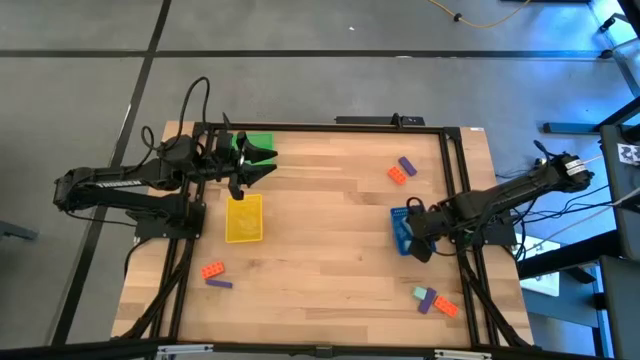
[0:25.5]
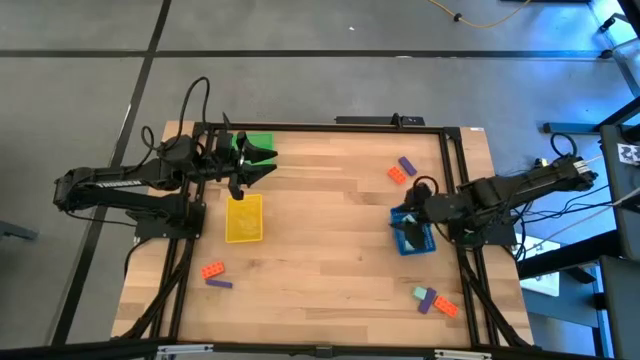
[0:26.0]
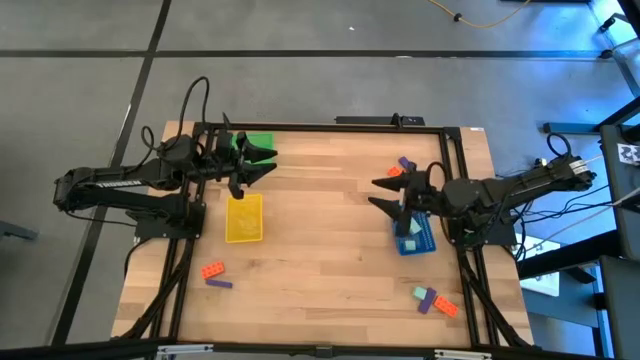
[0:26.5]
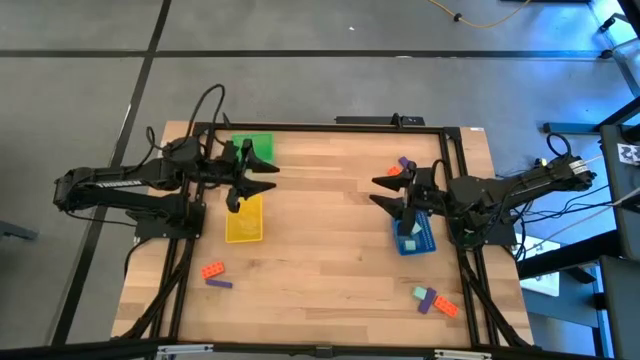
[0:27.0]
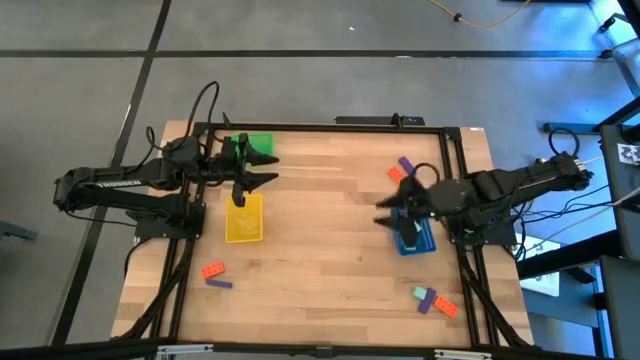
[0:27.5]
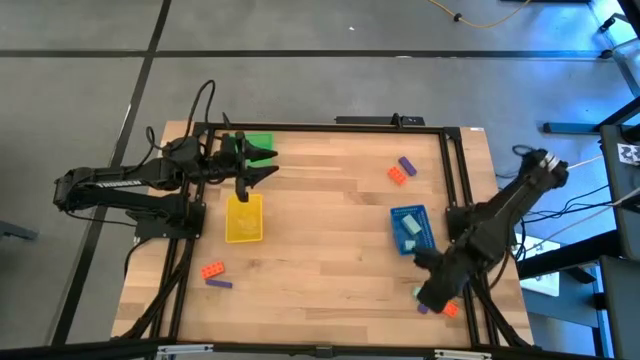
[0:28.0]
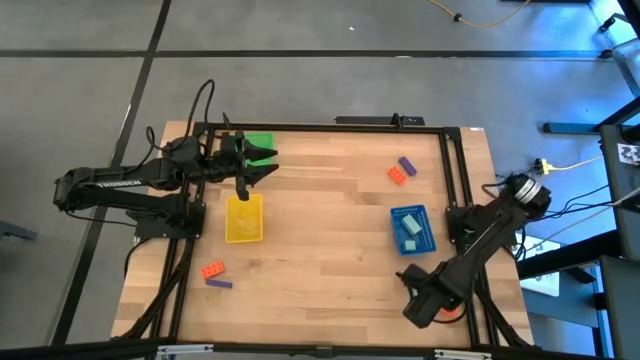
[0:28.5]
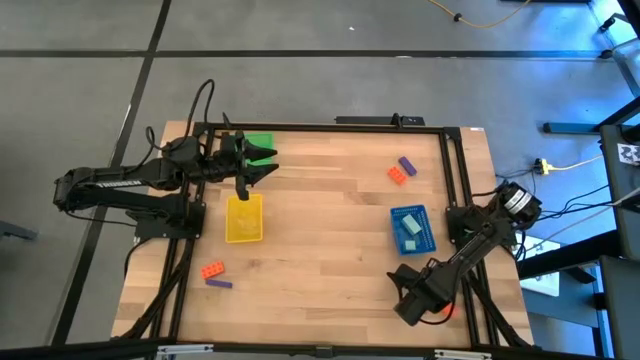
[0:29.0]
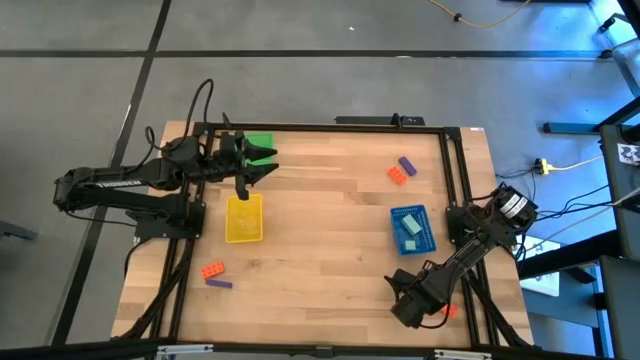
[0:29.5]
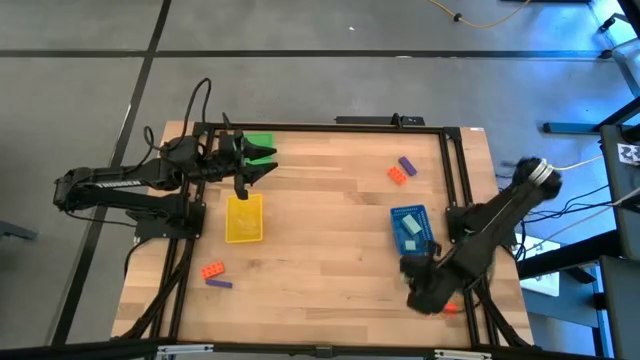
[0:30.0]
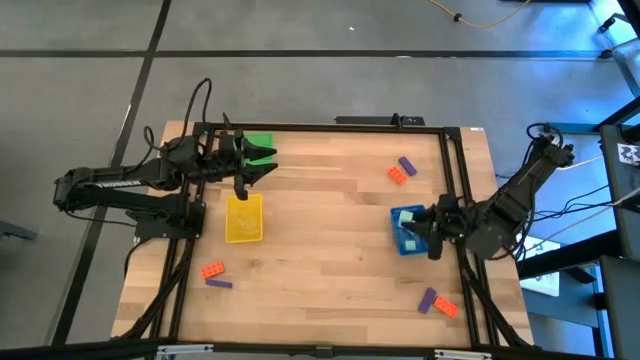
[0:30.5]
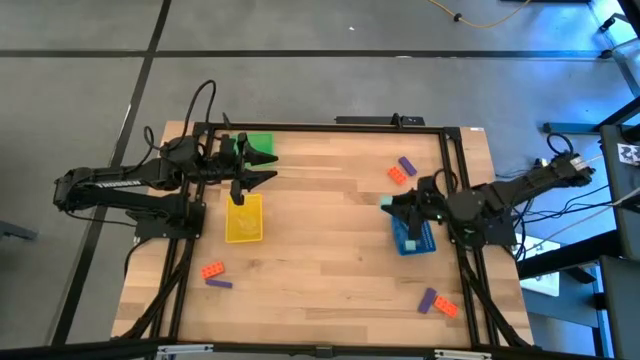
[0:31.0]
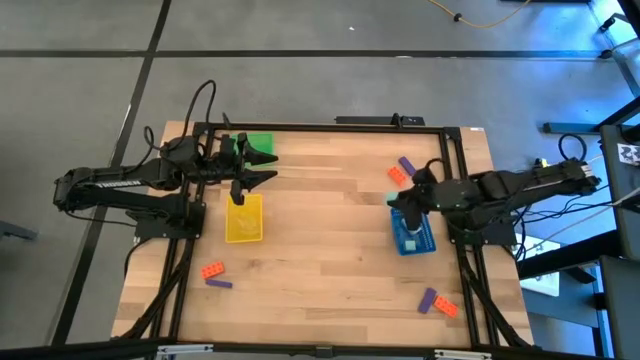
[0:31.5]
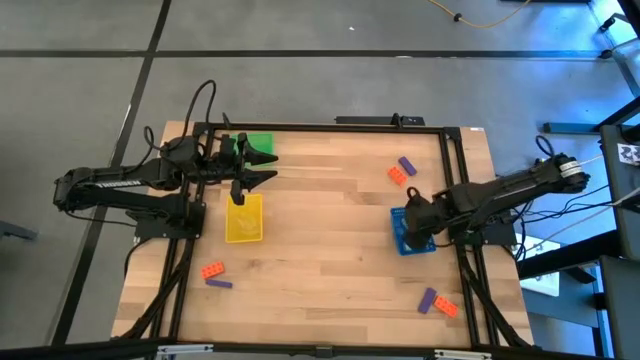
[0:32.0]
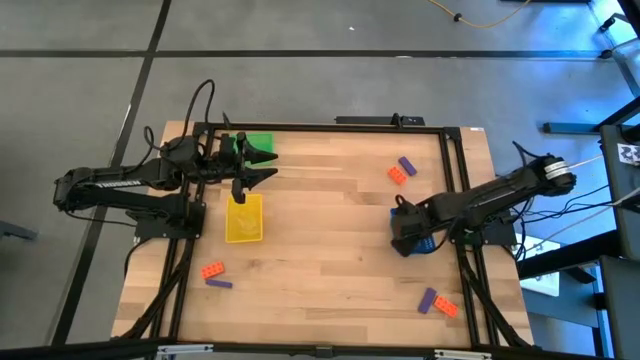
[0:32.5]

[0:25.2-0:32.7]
Task: Sort & place blocks by color
Put the blue block into the blue bin

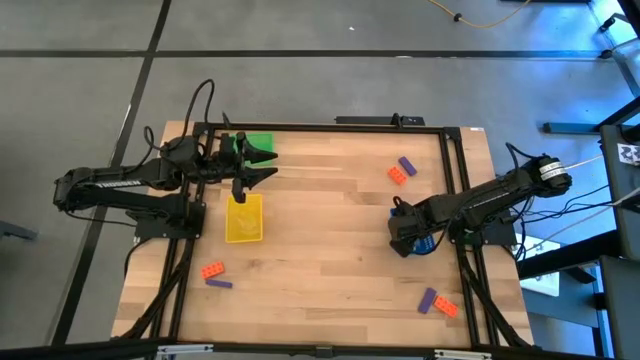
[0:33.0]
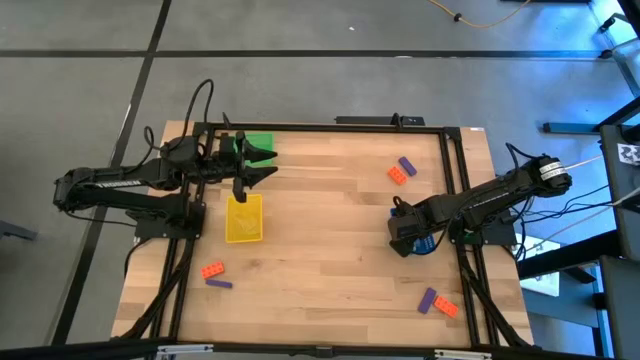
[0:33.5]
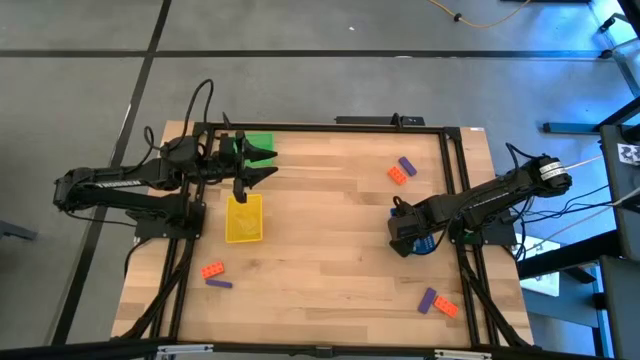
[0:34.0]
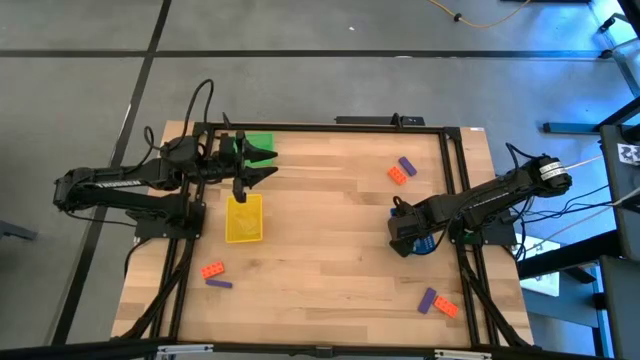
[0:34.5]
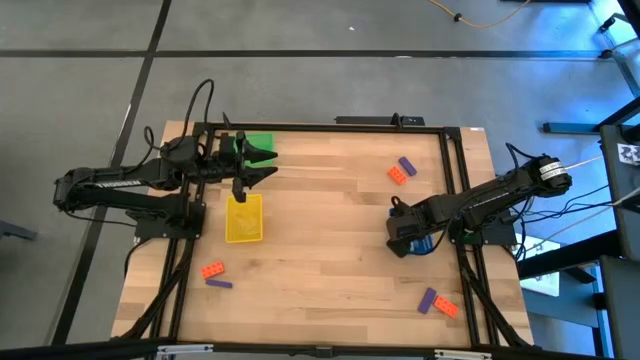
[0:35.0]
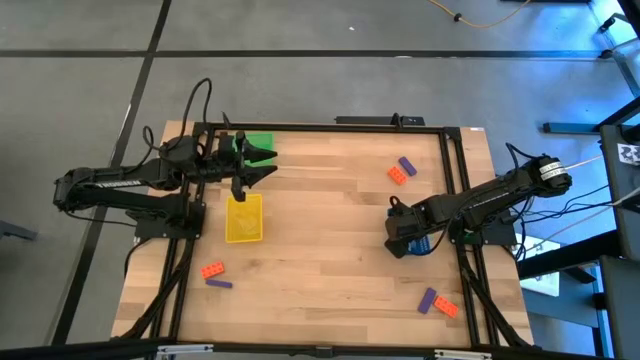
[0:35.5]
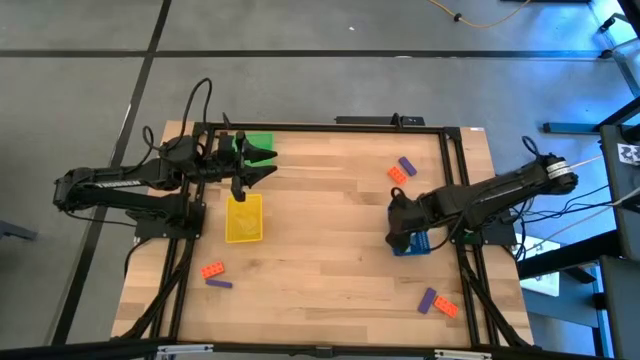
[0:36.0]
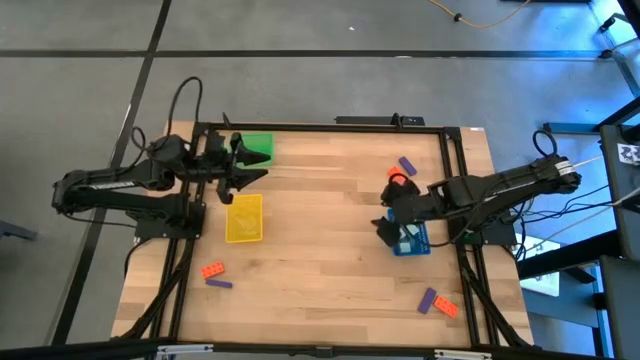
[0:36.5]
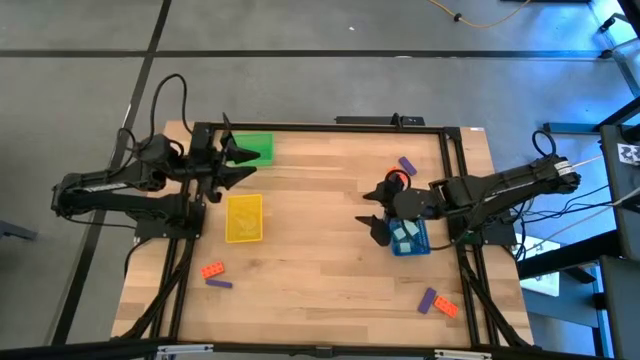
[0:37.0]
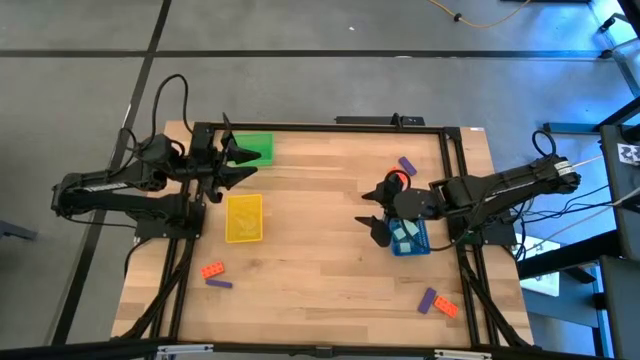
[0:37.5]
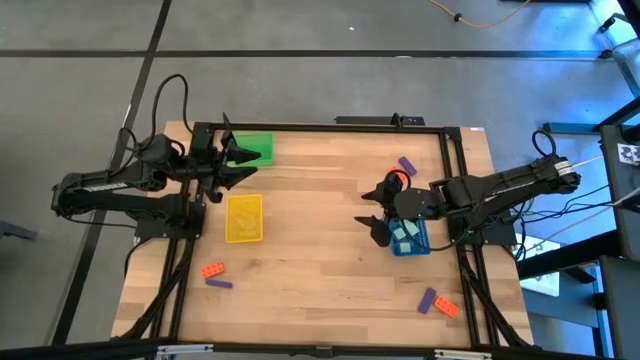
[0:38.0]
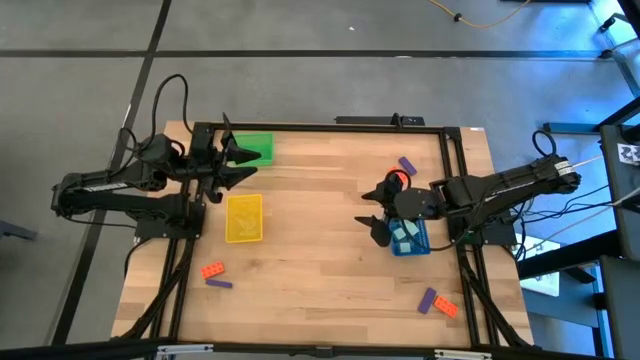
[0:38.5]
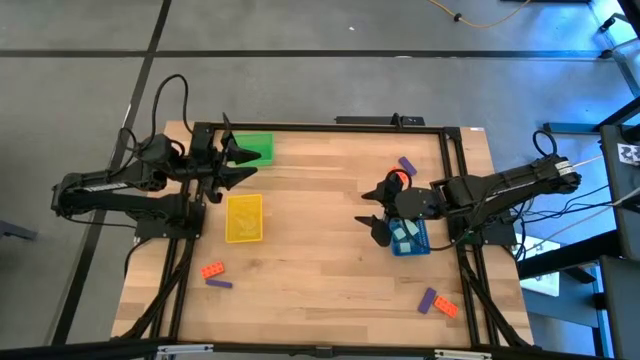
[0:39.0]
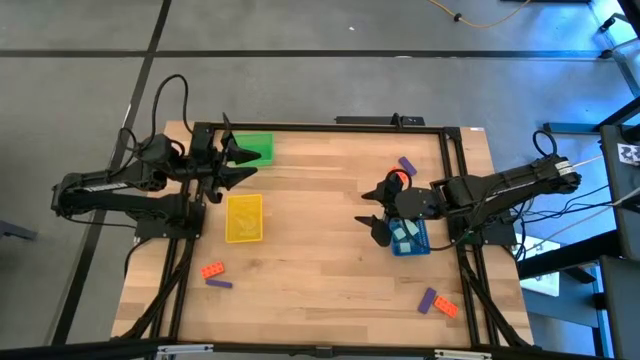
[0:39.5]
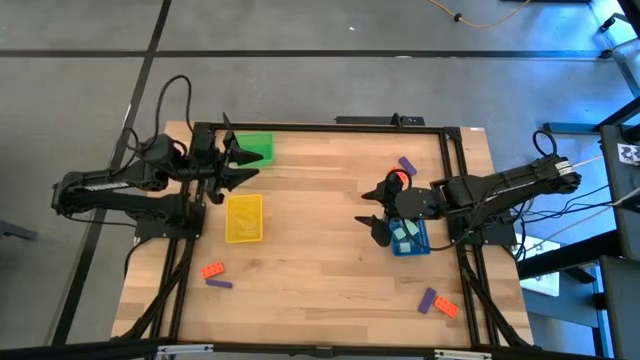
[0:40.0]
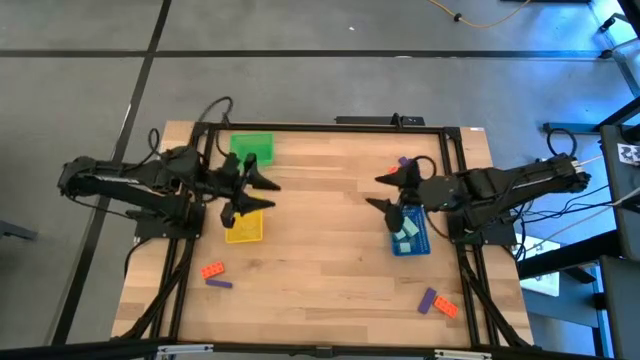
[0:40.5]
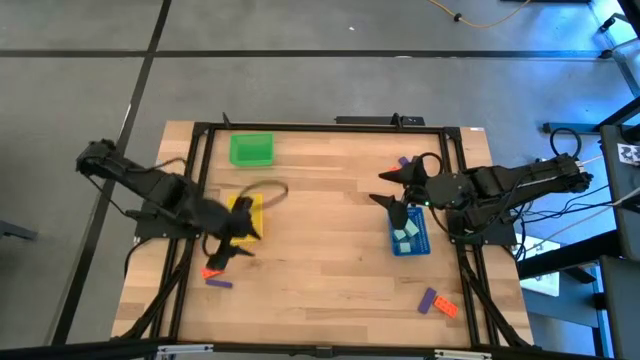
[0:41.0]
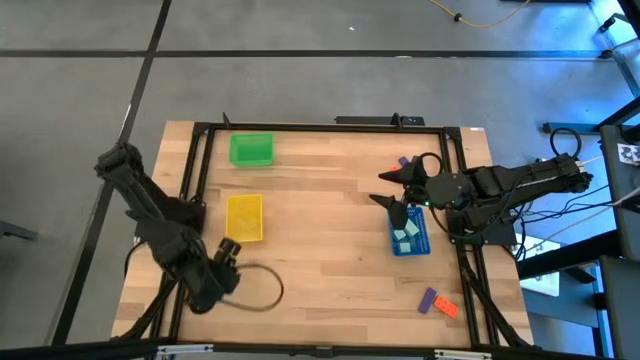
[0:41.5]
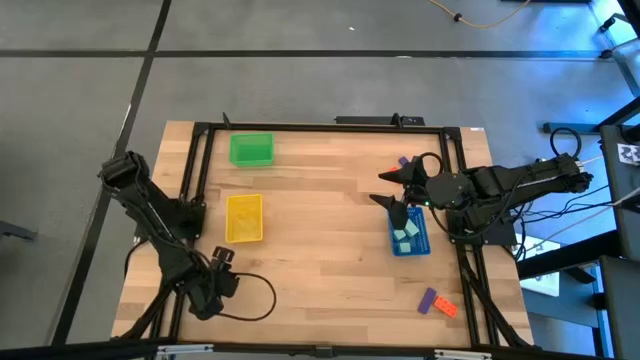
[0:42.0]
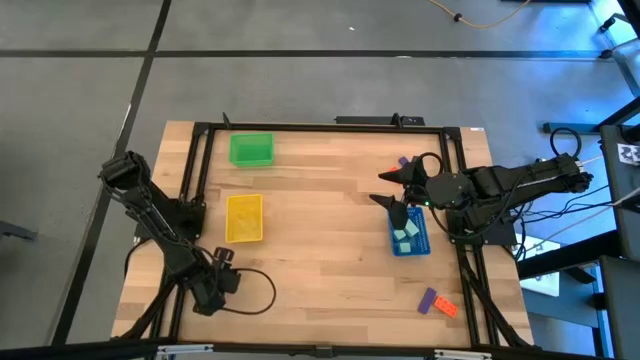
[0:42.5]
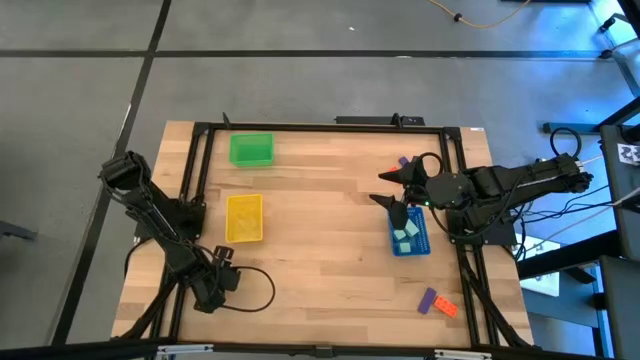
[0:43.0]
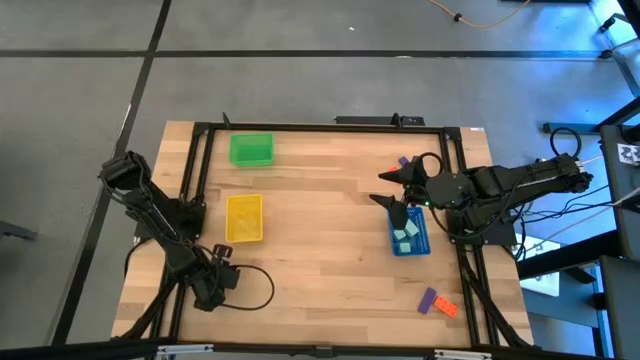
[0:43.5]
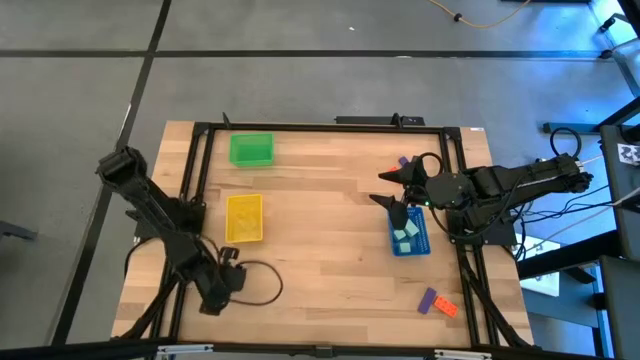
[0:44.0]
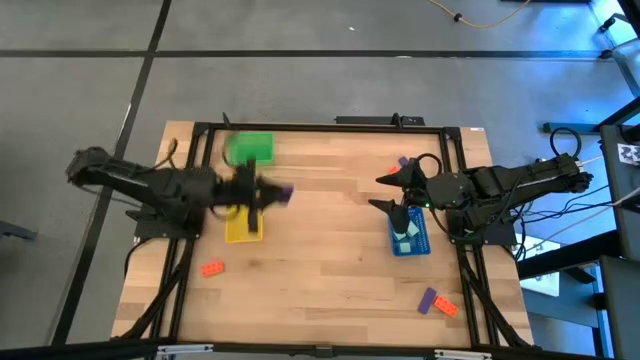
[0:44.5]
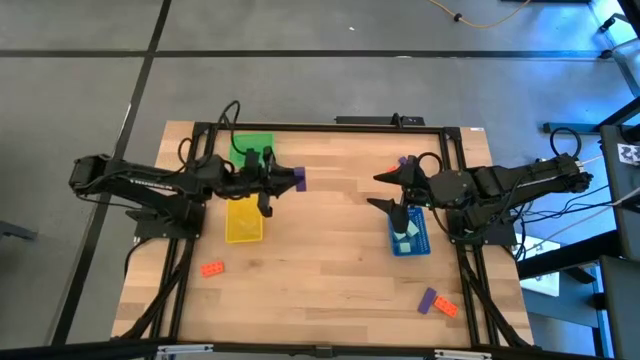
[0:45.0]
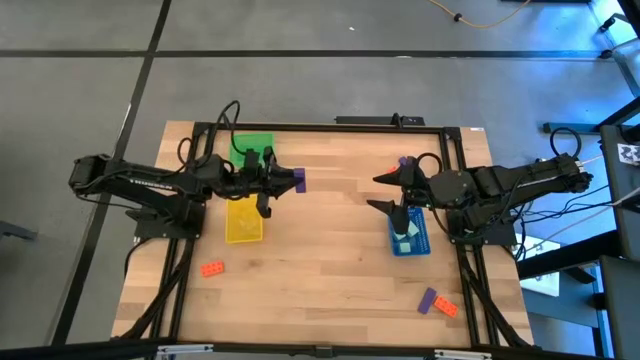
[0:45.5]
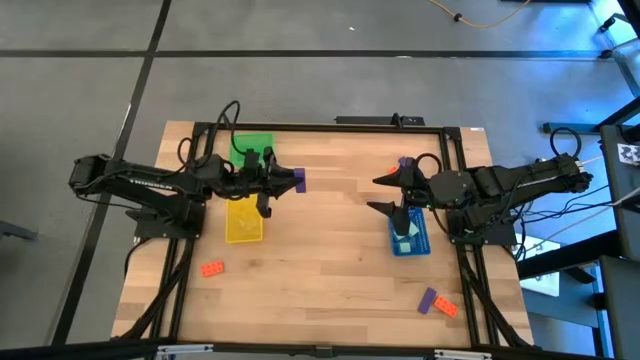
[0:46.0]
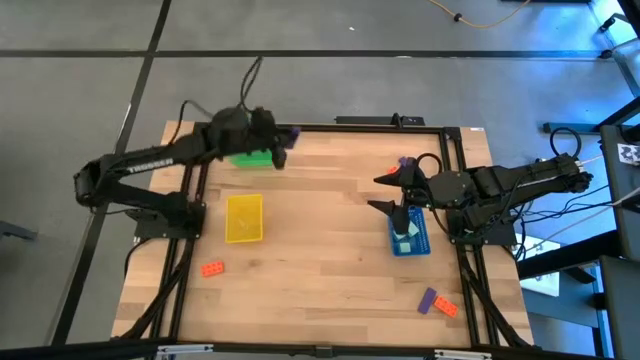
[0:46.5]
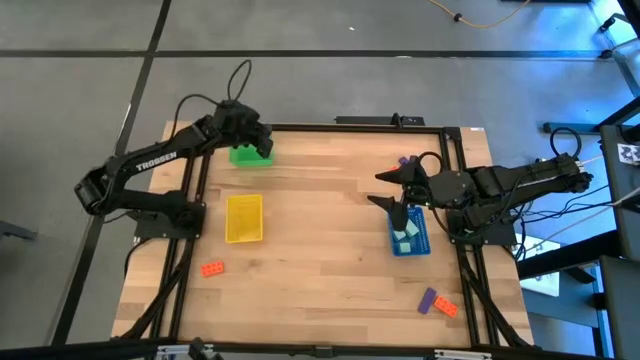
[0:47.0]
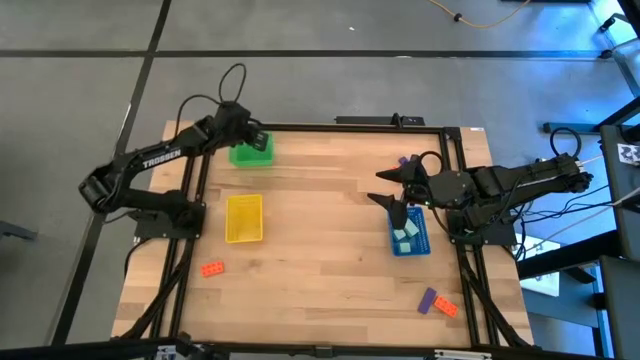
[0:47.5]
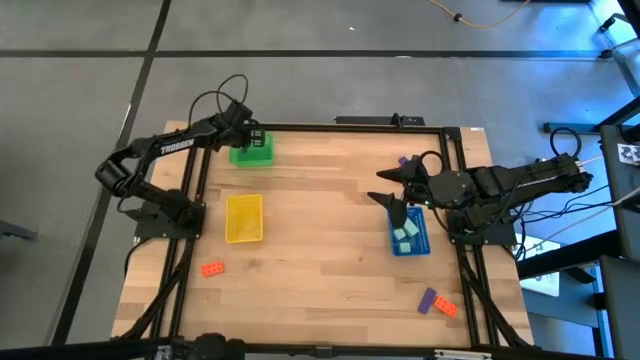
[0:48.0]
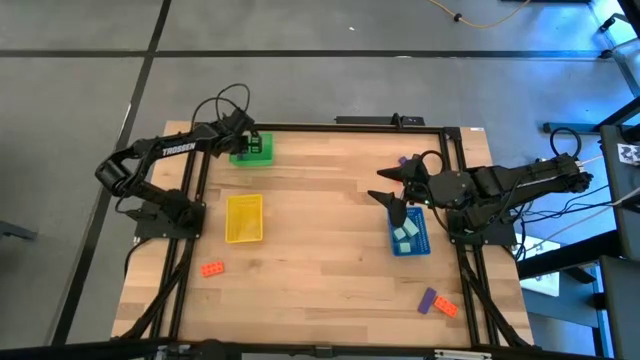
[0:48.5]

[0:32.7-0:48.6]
Put the bottom left violet block into the green bin
